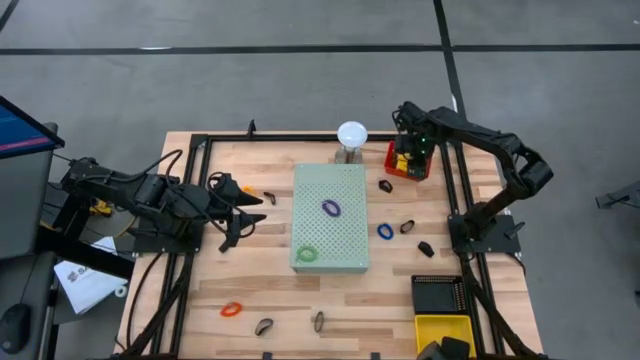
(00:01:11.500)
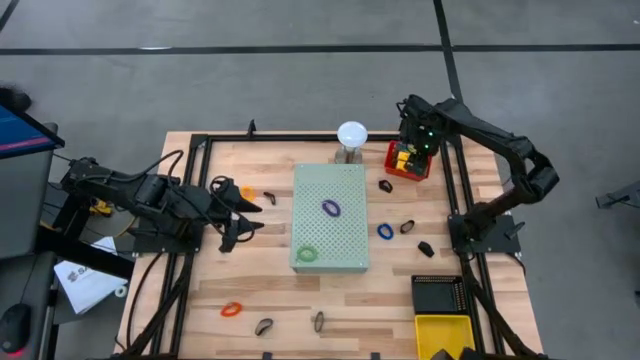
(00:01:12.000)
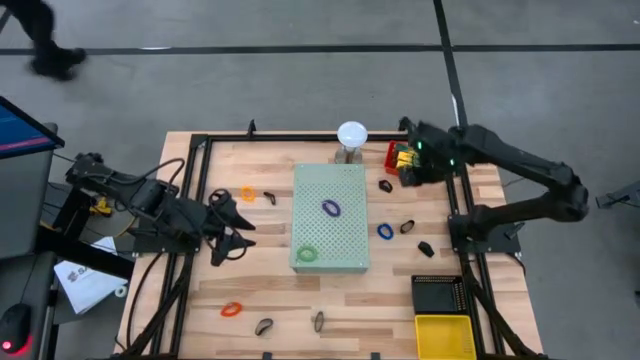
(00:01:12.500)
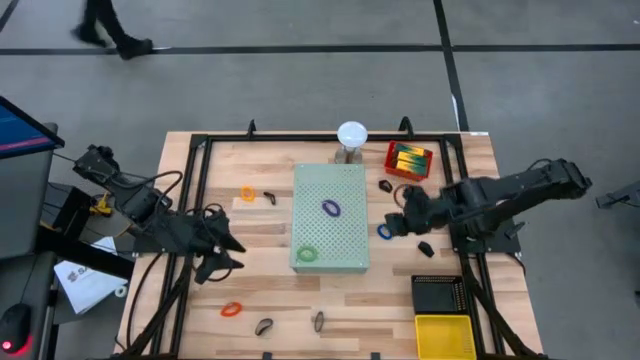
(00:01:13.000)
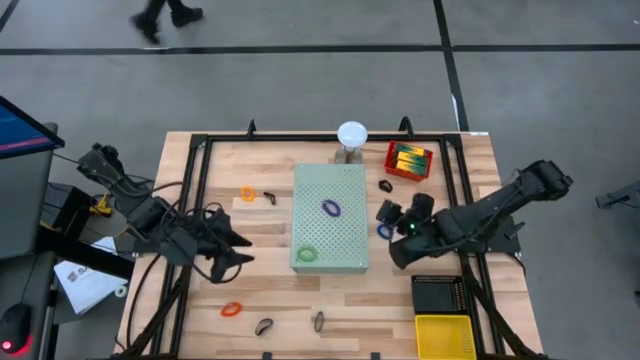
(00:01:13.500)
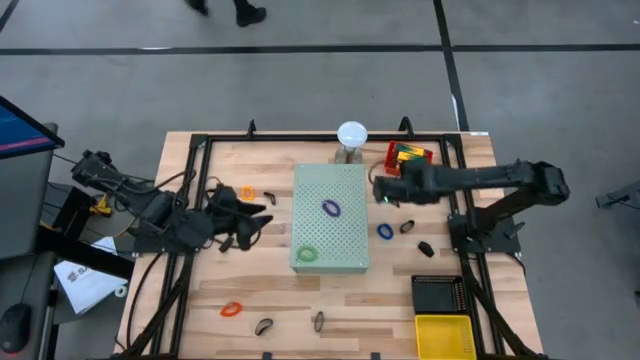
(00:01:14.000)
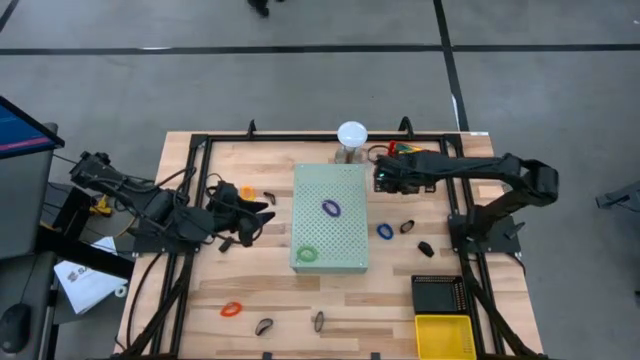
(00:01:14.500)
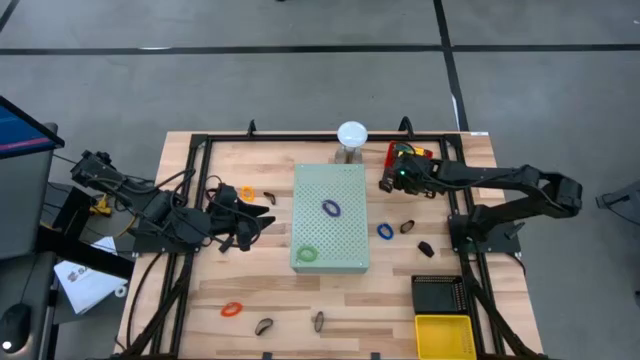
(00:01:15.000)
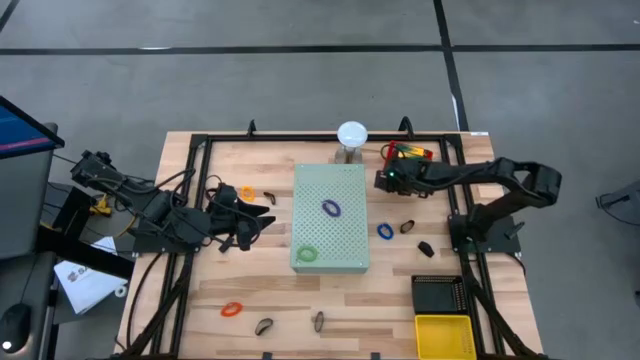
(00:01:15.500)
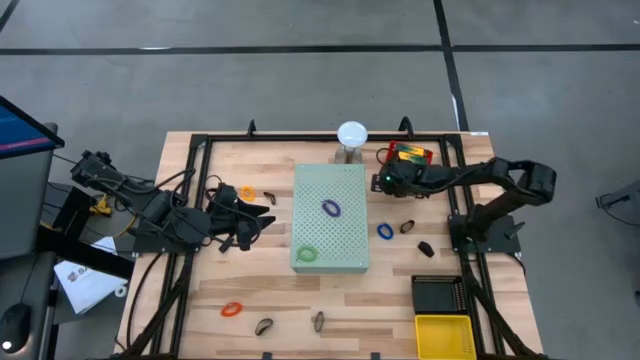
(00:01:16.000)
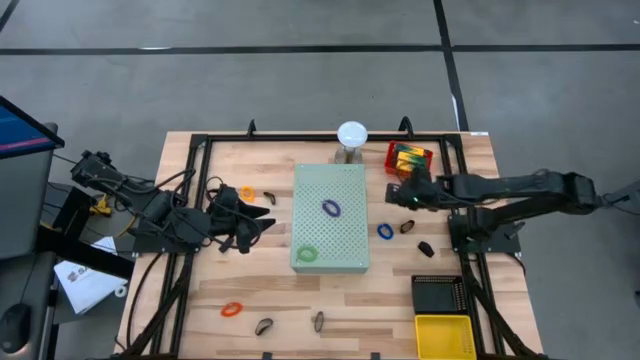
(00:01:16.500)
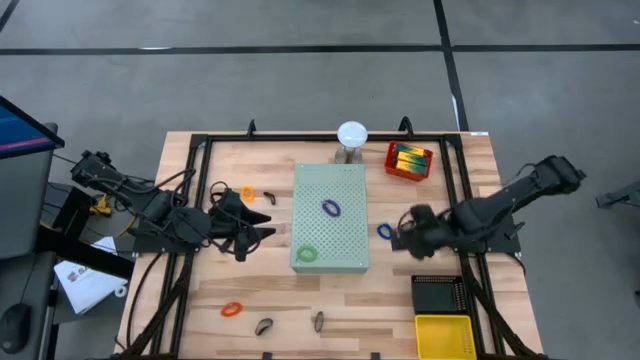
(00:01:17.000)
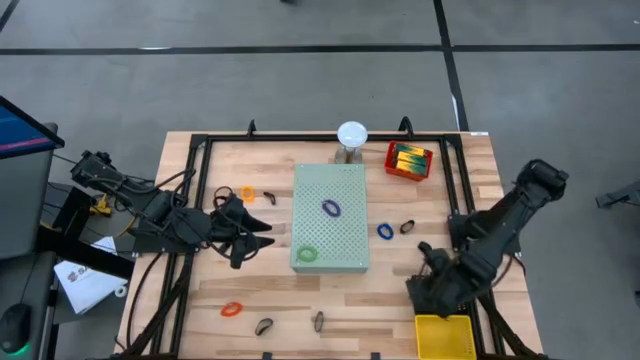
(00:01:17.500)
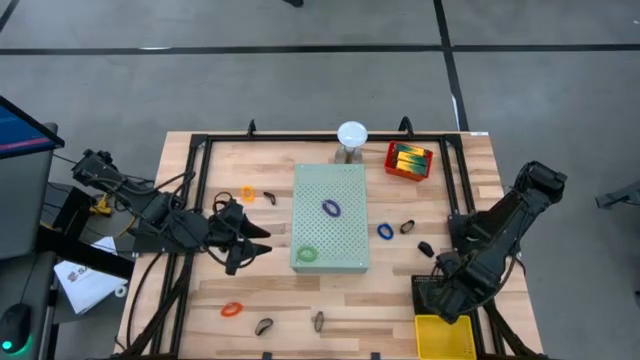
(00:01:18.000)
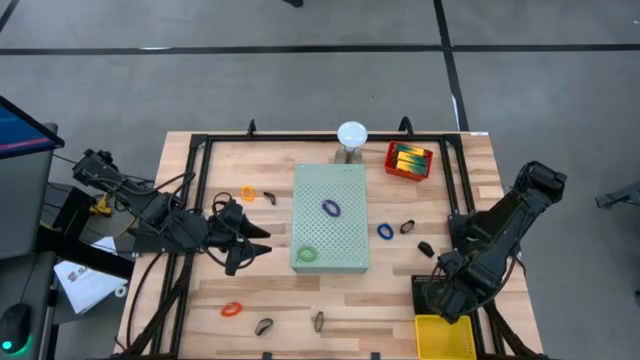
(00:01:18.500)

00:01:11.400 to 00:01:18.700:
Task: Pick & Place Office Desk Supplies
Put the black rubberband into the black bin

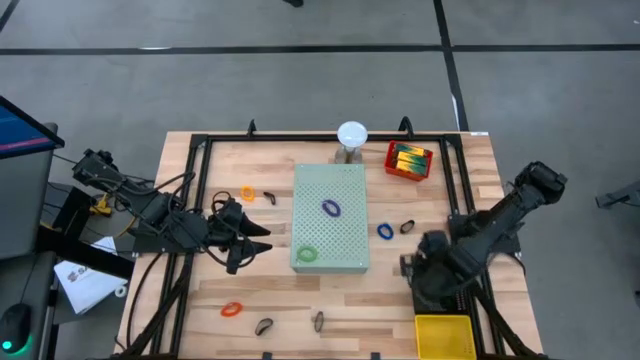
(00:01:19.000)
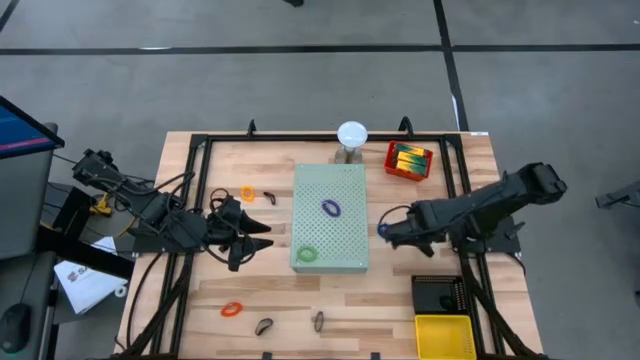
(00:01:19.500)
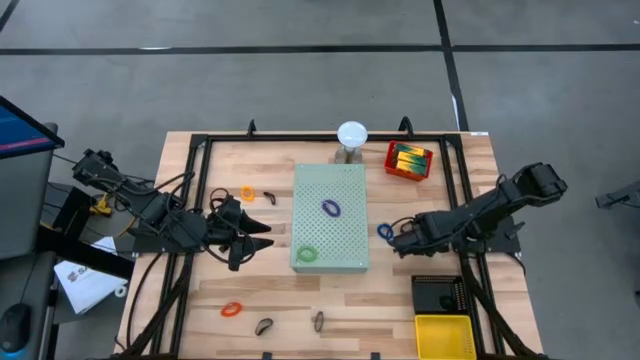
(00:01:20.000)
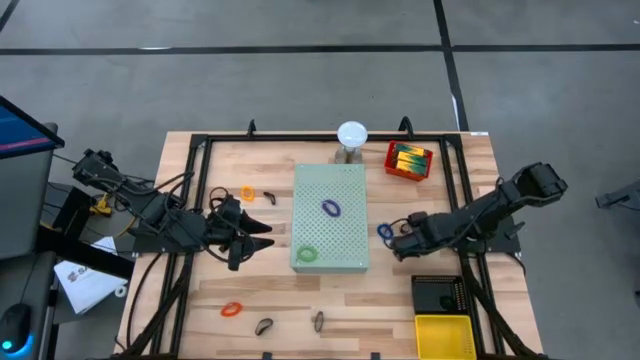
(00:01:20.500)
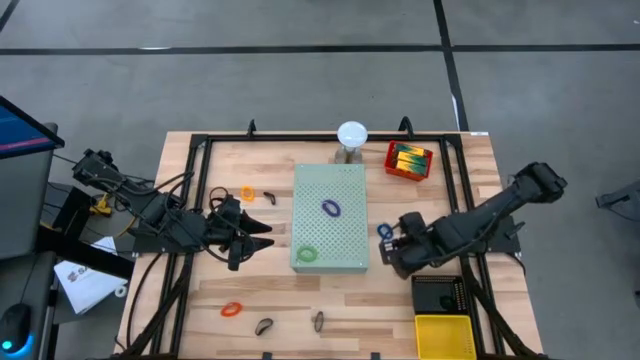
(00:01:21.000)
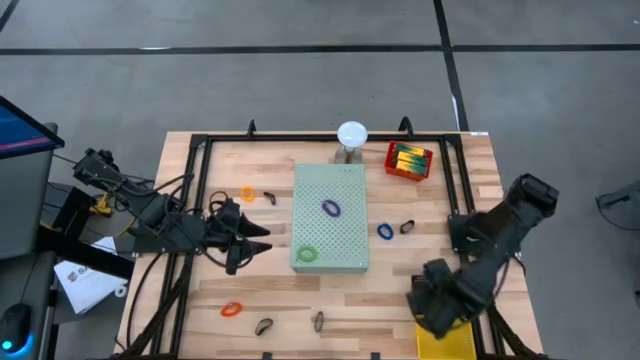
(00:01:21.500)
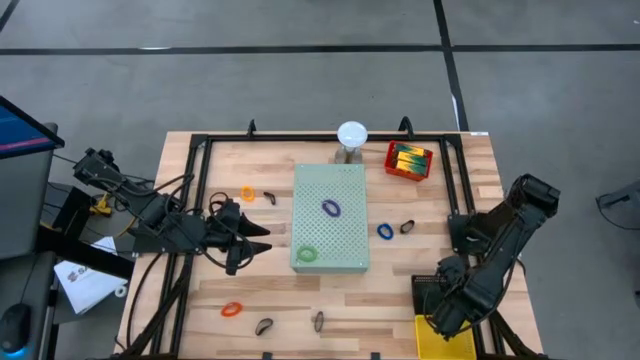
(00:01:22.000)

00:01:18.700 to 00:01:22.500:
Put the black rubberband into the black bin

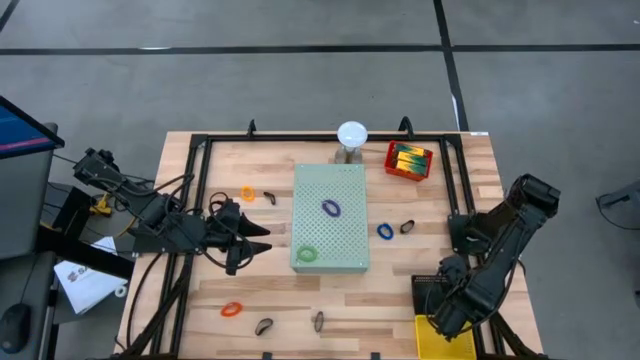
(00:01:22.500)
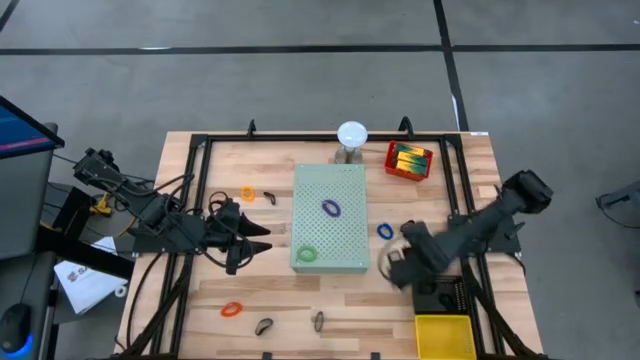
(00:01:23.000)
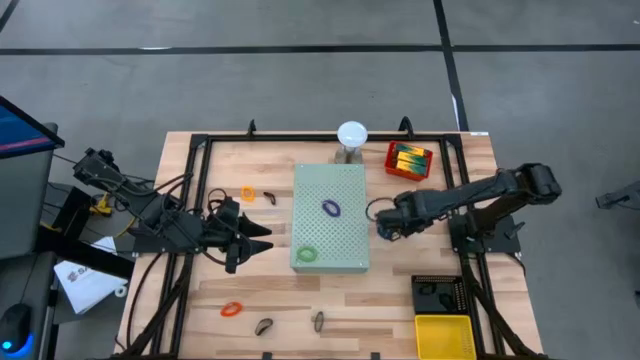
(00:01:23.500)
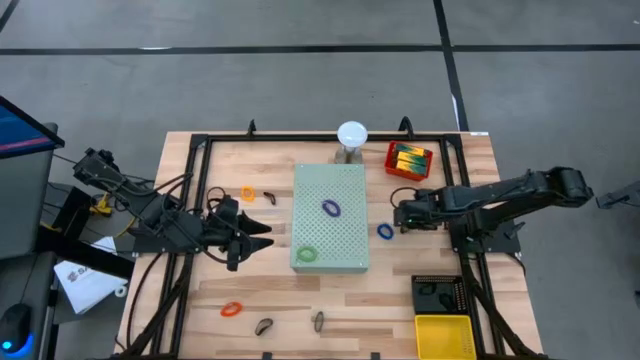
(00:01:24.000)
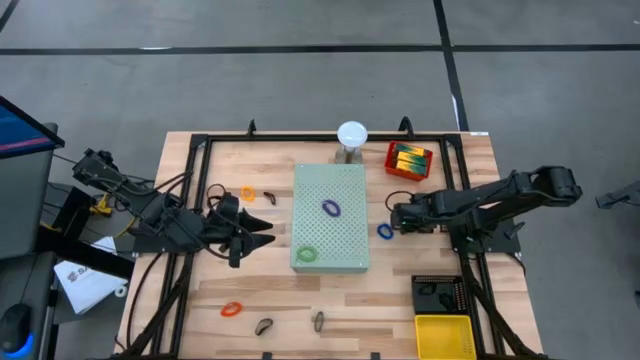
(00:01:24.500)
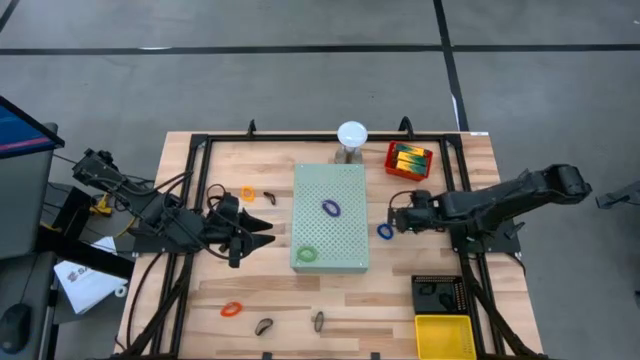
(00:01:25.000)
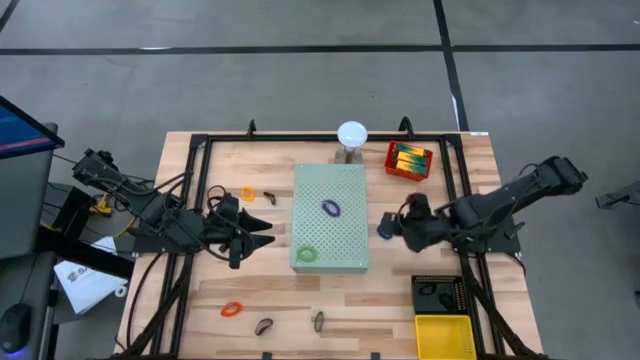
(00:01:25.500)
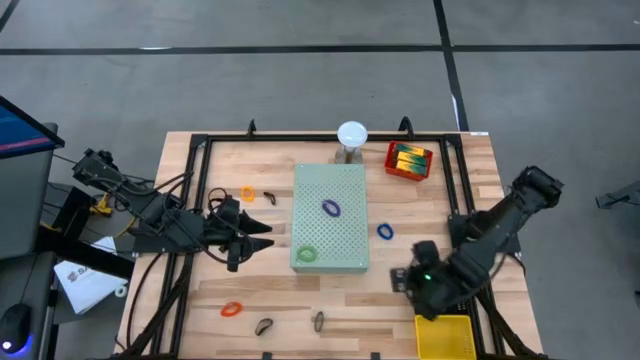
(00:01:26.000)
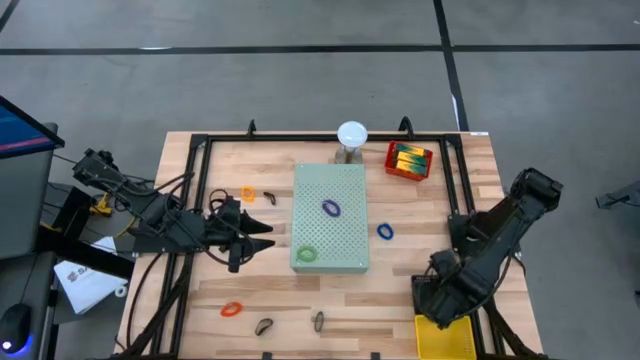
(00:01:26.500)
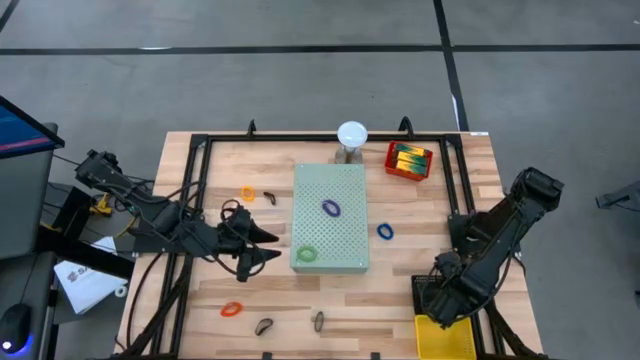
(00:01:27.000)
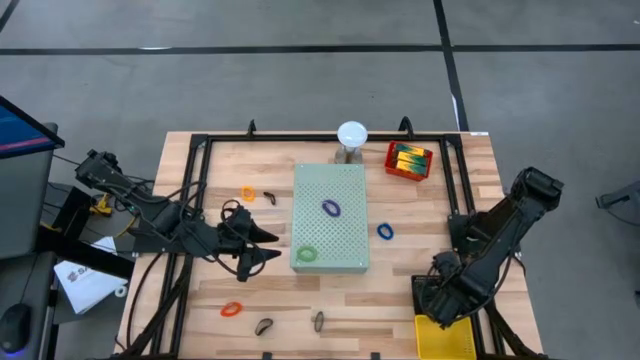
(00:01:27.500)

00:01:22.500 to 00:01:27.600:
Put the black rubberband into the black bin
